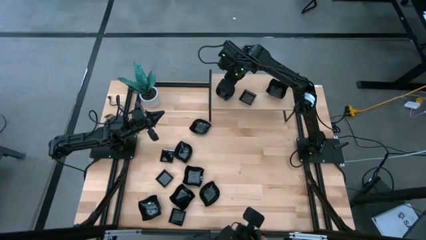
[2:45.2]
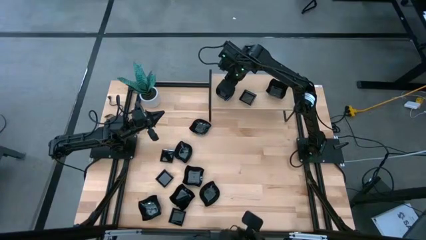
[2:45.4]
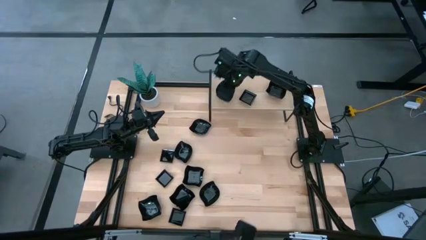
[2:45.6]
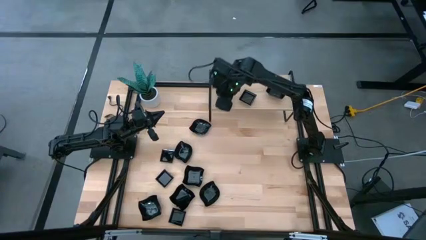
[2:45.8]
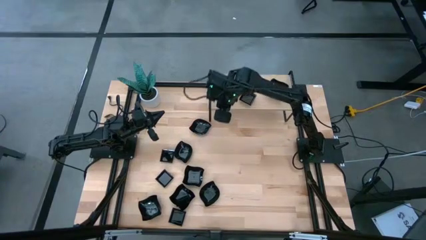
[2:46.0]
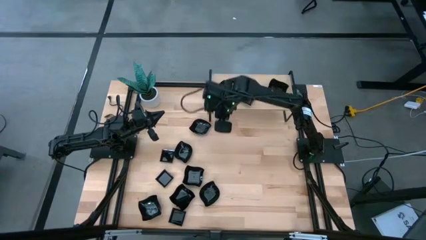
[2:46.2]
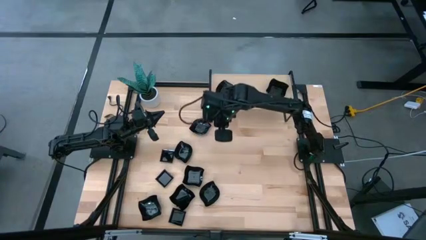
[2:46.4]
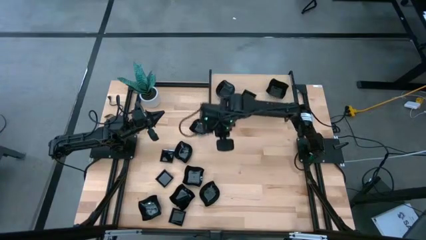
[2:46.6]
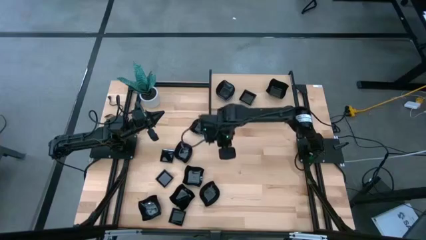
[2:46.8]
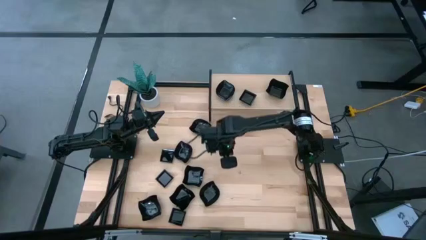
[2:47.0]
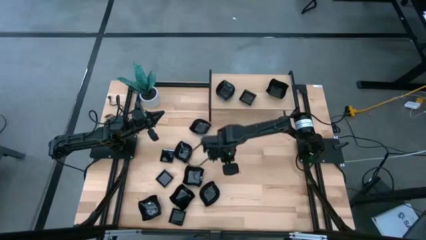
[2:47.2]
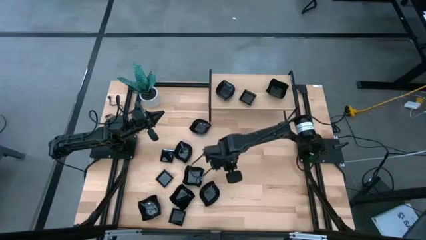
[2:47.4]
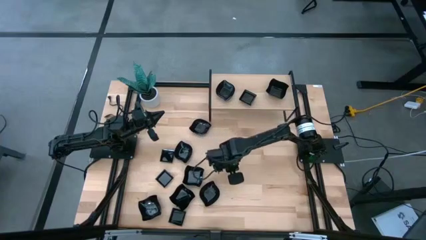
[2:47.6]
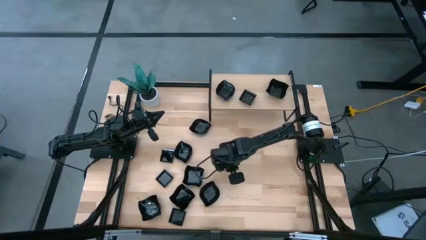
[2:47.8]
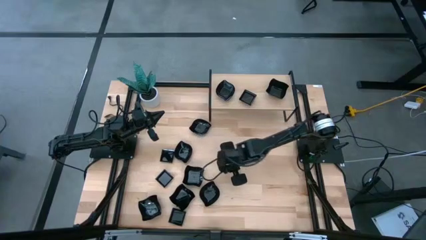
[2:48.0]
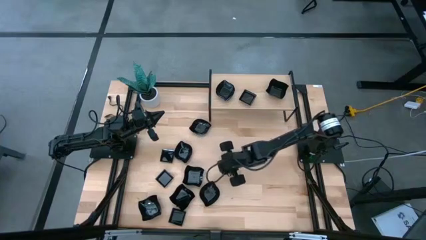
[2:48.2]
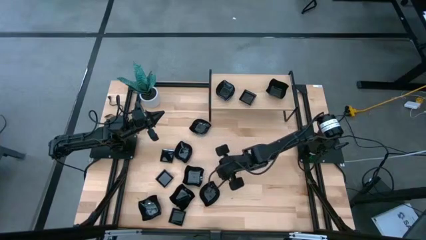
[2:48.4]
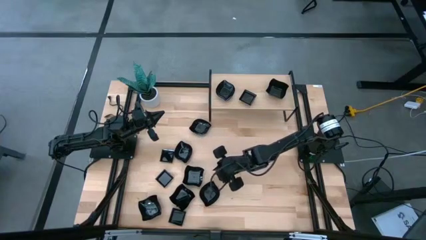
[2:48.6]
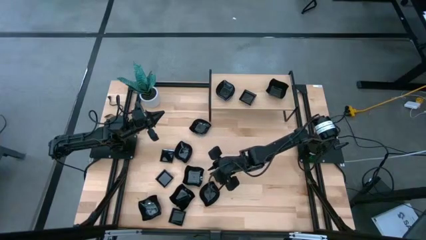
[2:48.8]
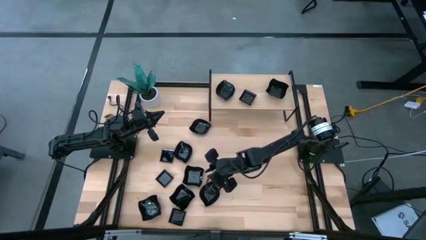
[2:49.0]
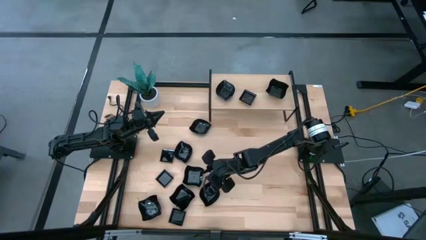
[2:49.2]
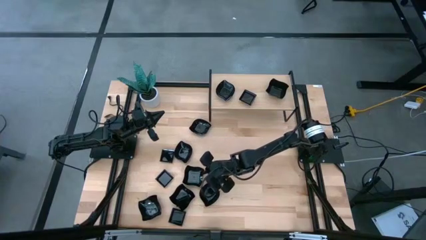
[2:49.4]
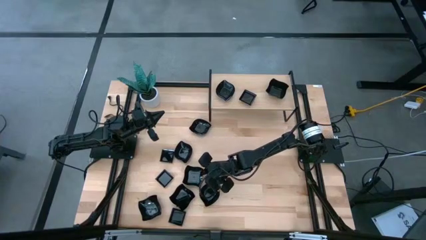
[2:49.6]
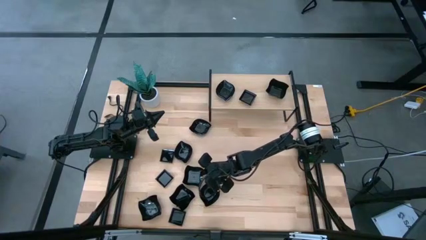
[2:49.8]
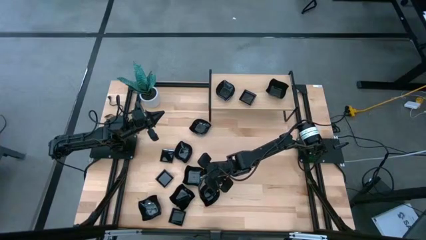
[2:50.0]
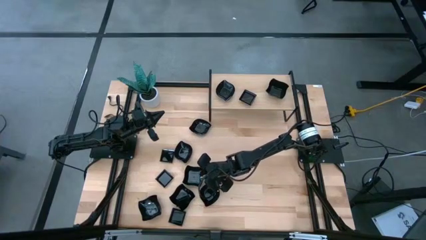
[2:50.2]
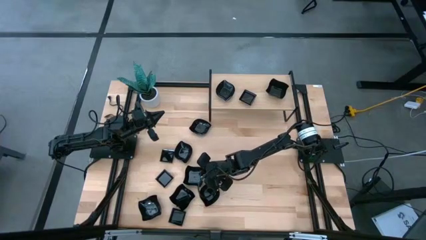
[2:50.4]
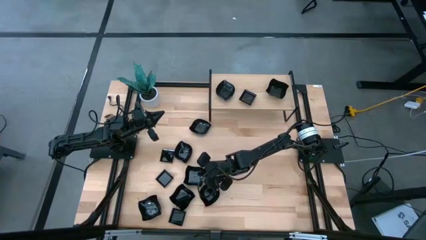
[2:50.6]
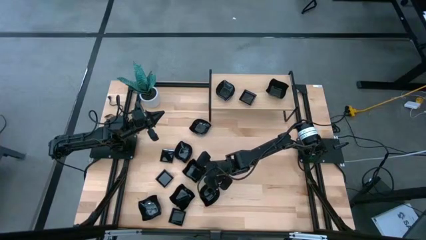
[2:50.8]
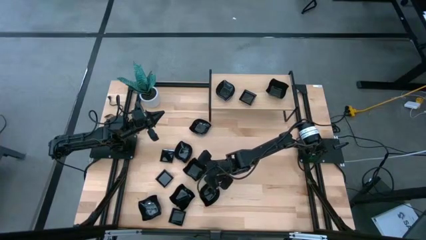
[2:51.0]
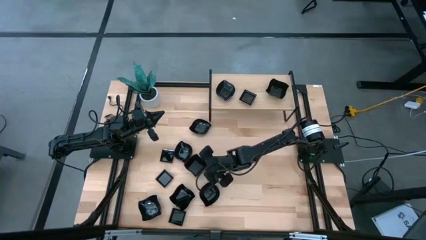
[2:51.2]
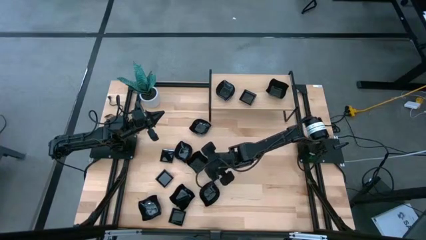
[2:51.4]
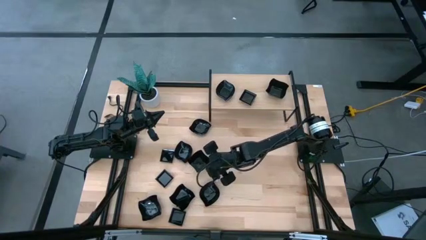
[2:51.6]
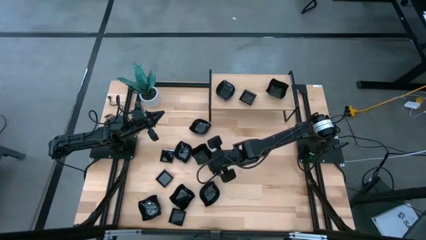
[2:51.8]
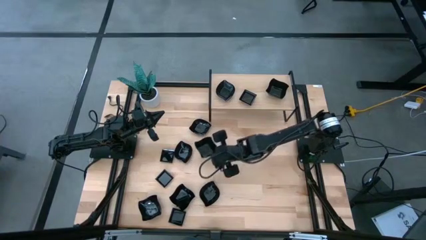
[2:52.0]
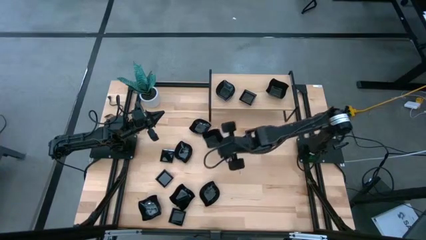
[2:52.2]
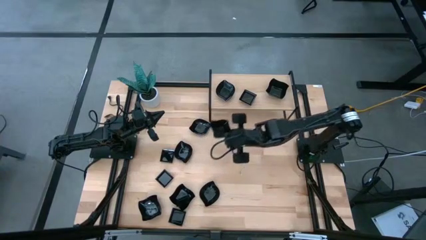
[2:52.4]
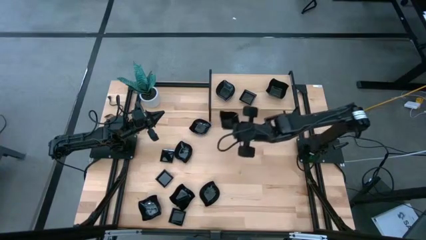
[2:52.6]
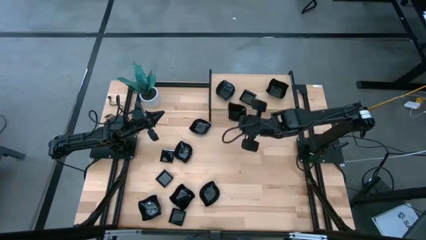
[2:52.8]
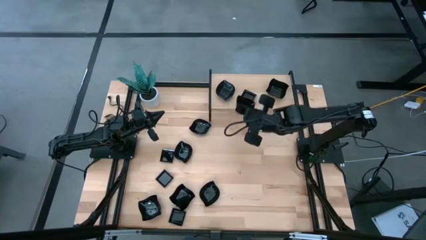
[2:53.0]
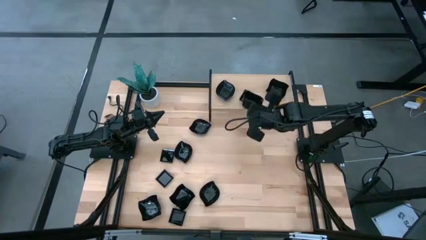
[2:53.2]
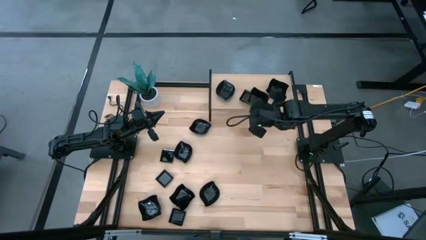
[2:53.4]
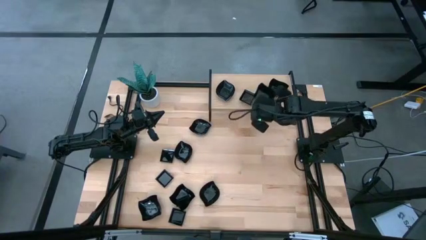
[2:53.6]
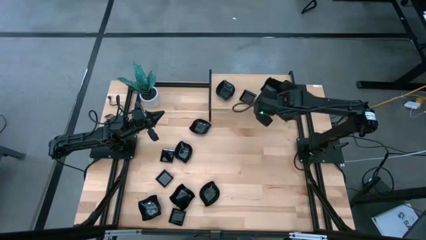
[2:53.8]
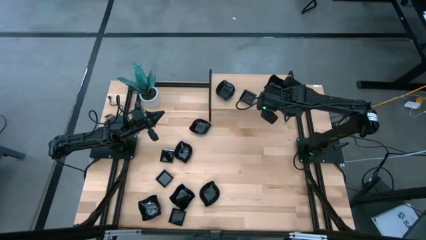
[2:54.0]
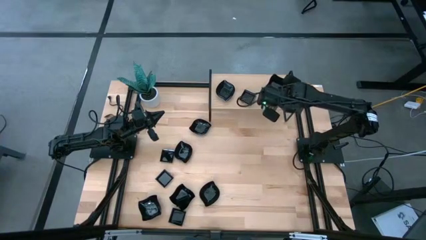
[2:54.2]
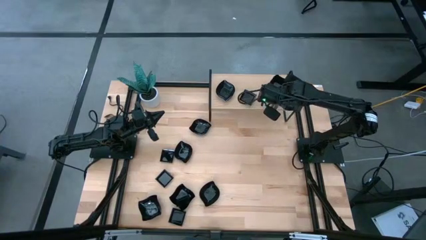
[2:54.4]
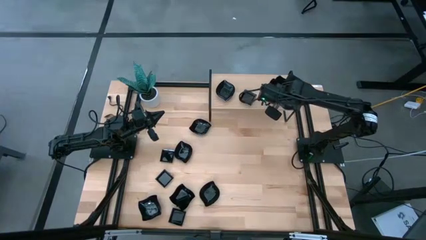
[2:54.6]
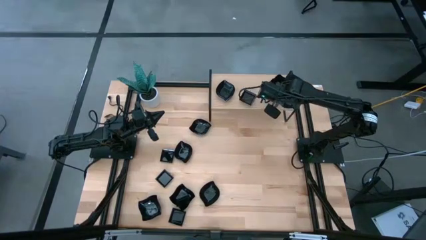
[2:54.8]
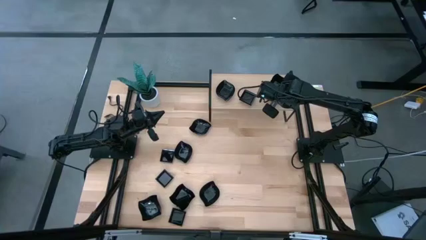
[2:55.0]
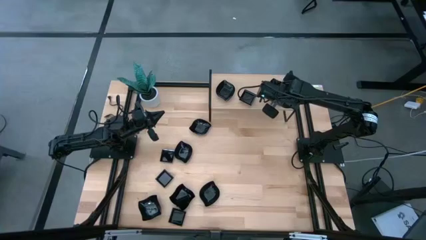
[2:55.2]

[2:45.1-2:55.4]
Task: Pick & Place Mini shaped plates
Stack the black distorted square plate on top of the black distorted square plate on the shelf

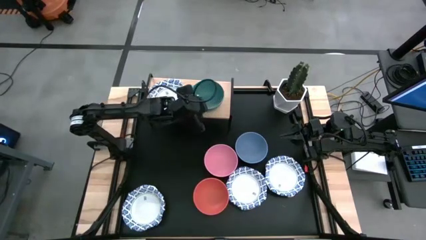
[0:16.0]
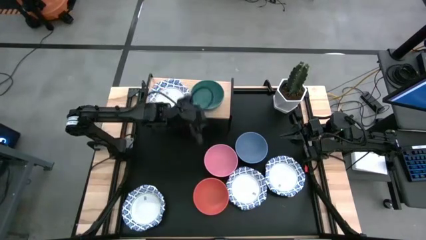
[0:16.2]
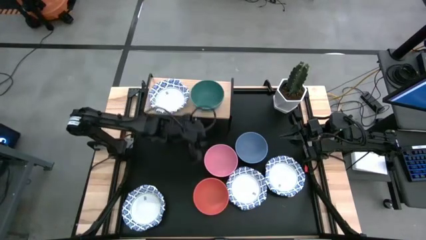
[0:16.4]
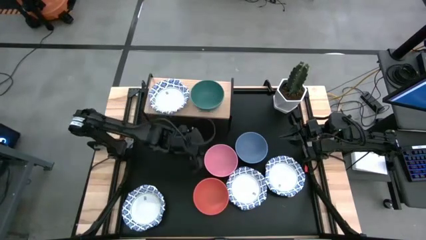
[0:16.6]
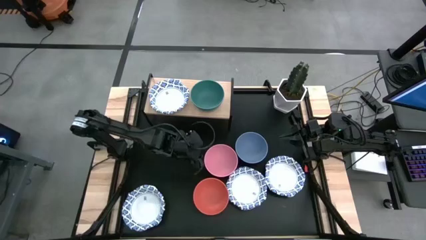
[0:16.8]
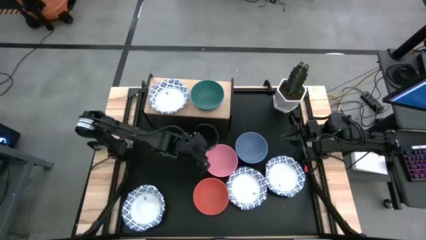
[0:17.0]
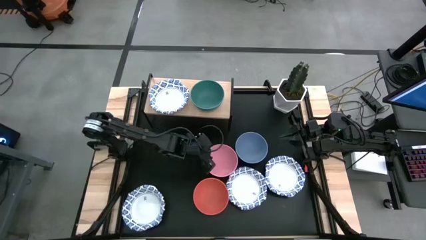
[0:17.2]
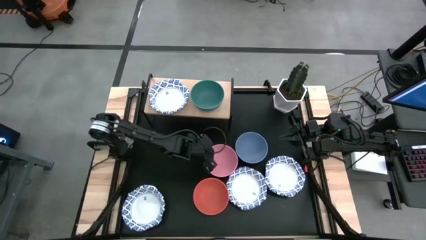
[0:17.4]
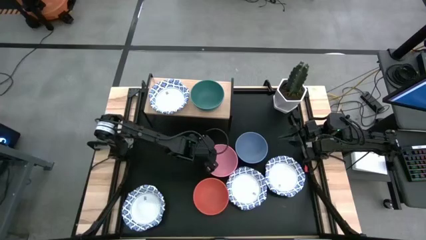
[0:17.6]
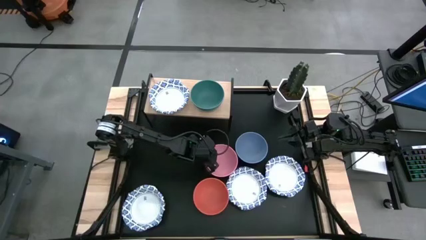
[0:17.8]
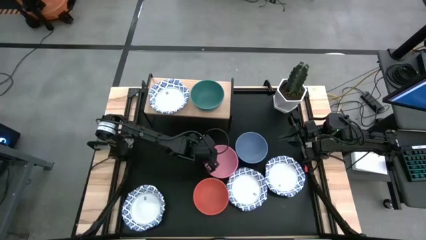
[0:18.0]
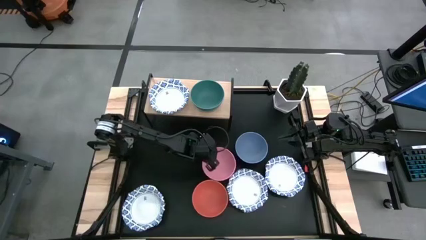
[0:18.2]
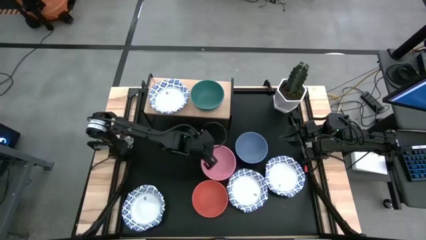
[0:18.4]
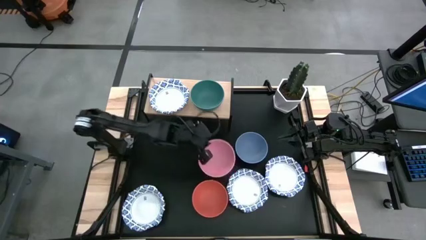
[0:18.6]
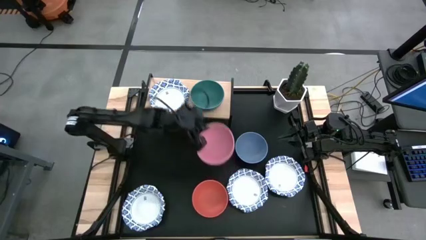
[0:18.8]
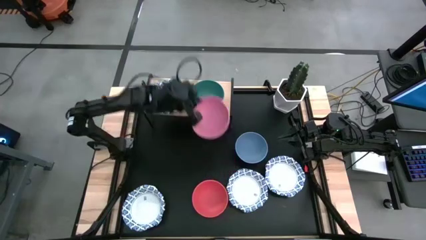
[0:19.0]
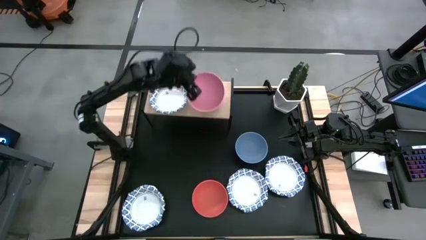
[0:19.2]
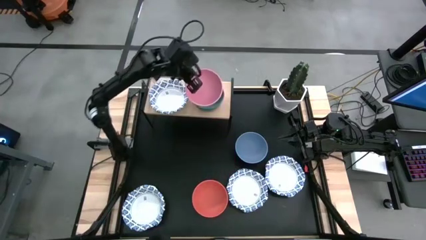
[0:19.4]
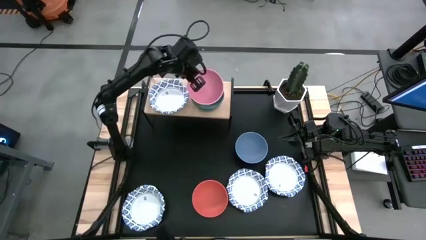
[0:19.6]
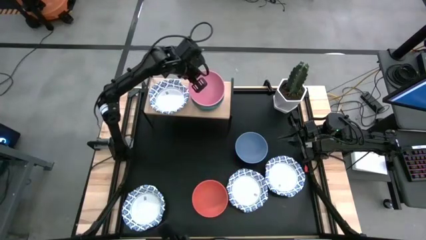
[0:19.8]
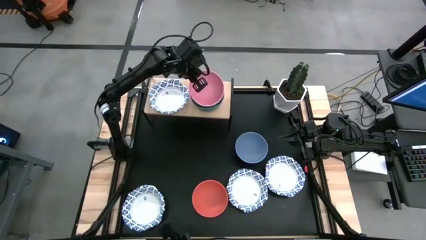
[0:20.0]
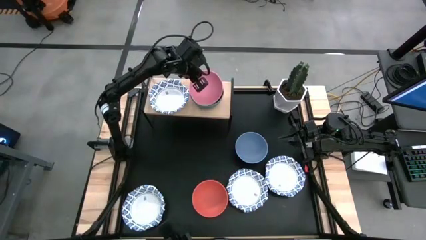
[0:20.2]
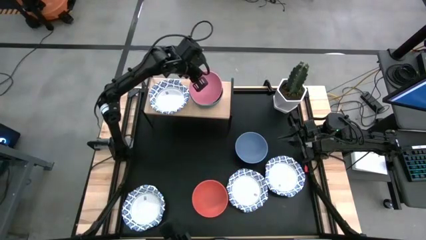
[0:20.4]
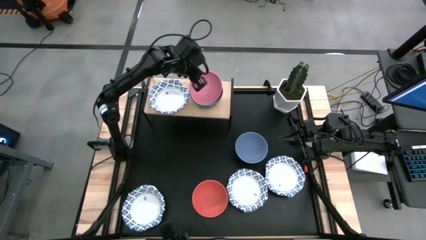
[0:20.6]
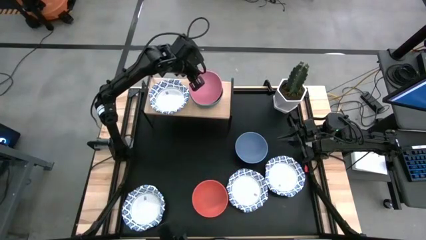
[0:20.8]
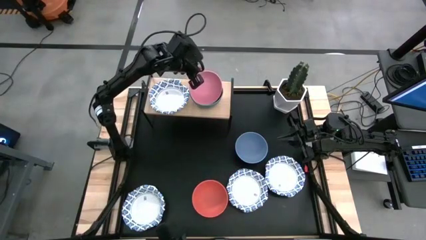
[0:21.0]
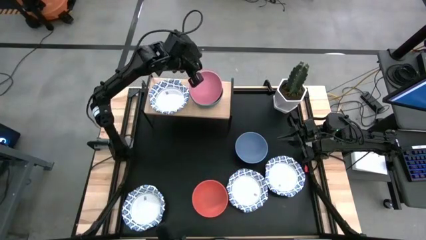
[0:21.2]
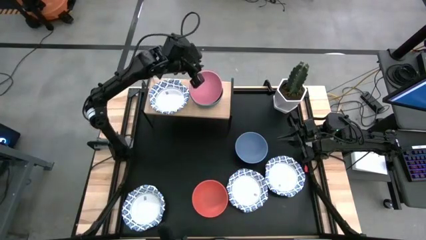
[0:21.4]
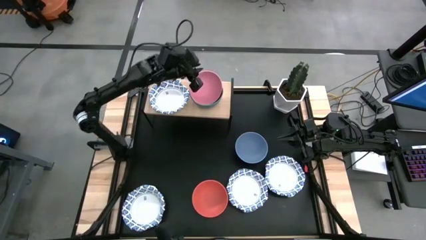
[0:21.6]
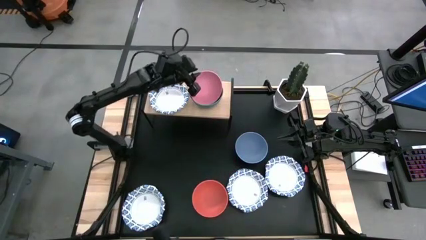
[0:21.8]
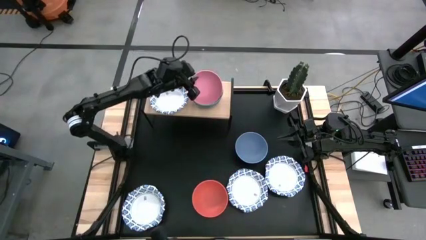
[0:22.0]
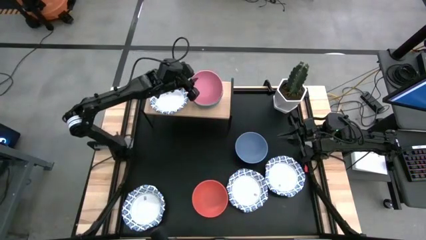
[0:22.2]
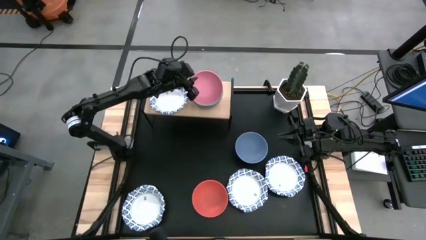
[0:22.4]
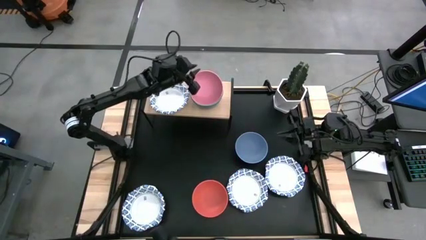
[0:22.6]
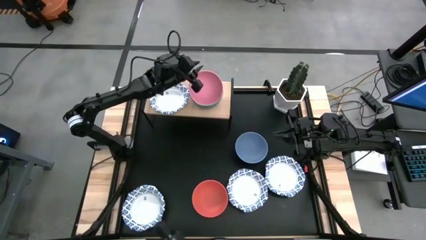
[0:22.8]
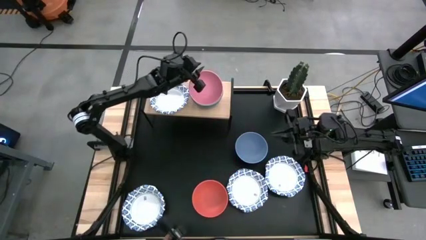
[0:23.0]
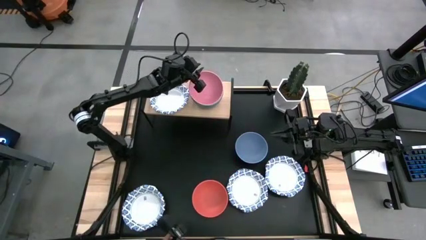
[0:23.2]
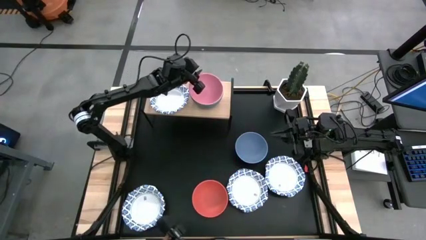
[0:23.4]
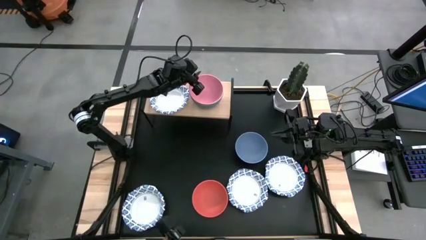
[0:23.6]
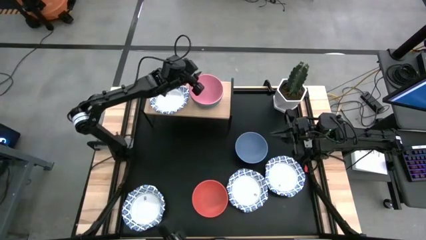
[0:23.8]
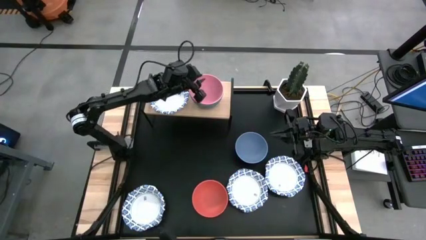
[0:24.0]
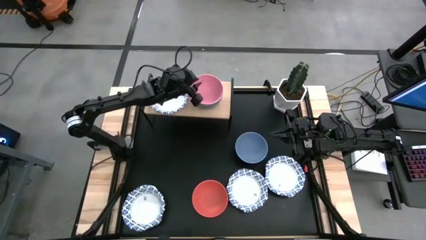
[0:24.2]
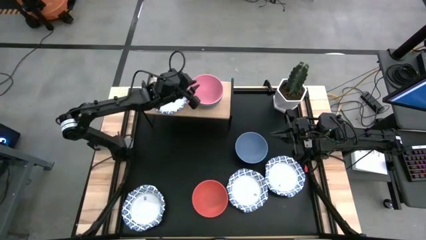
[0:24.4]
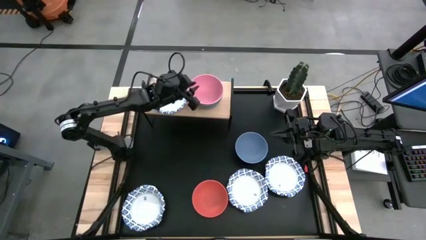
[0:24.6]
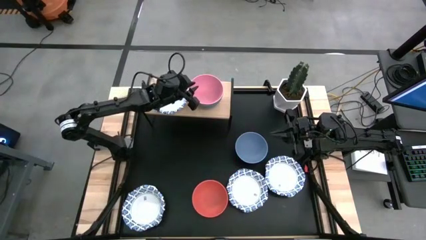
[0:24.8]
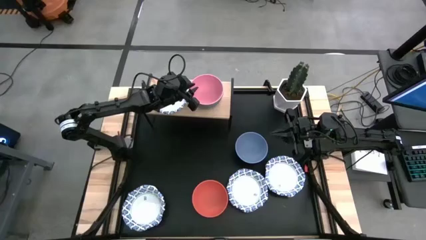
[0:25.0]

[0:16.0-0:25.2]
Task: Place and stack bowls onto a shelf
Stack the pink bowl on top of the green bowl on the shelf
